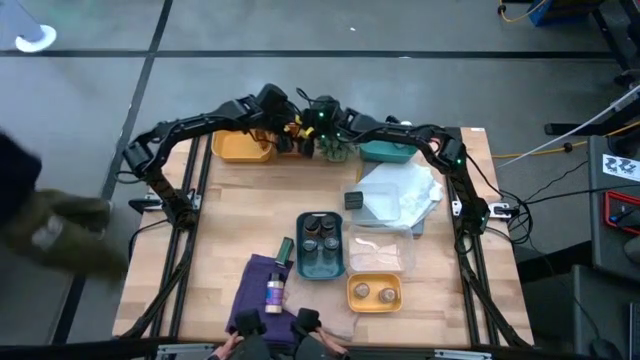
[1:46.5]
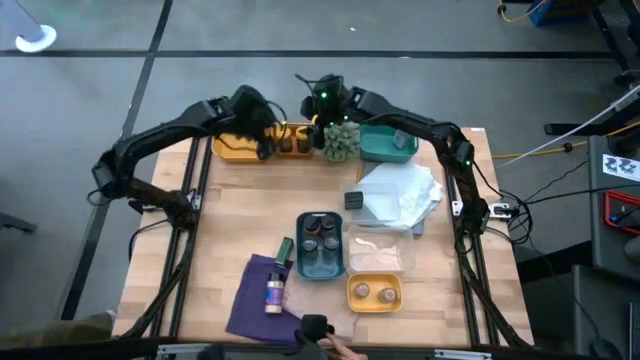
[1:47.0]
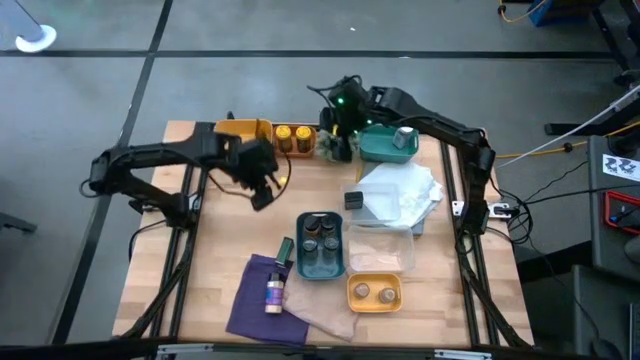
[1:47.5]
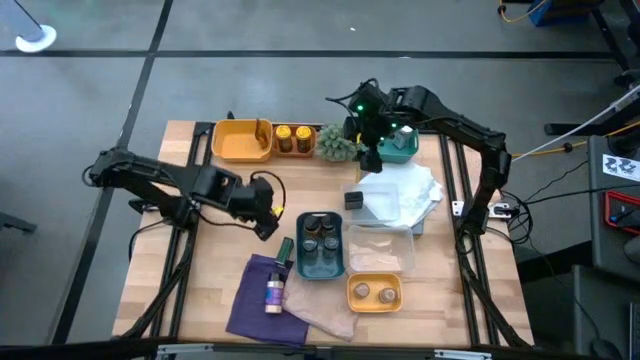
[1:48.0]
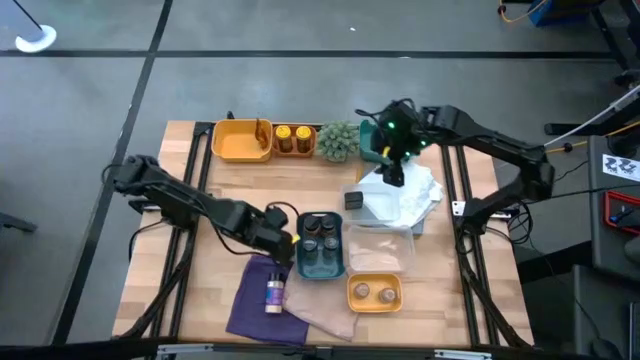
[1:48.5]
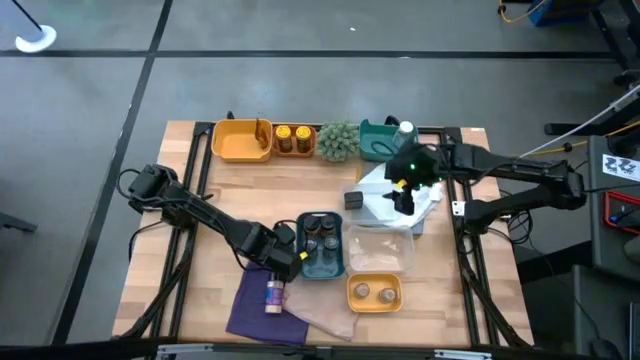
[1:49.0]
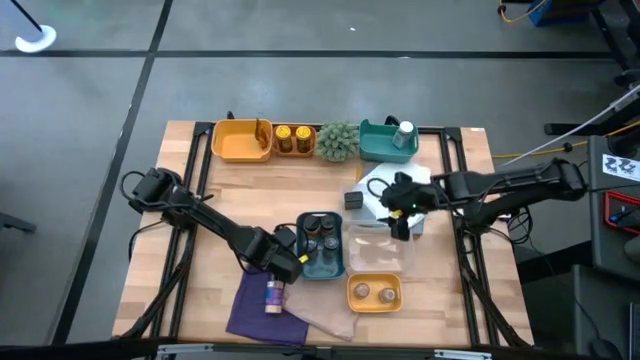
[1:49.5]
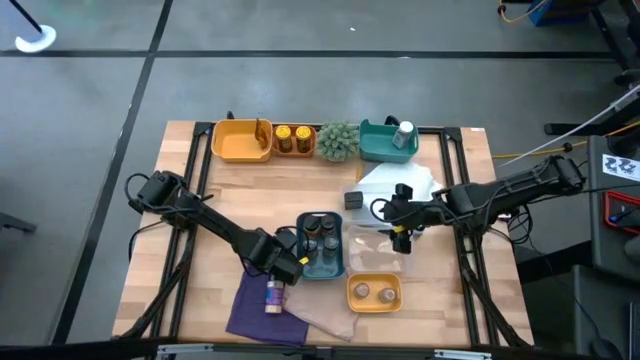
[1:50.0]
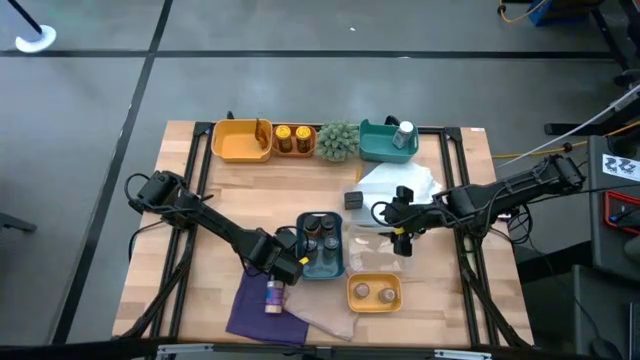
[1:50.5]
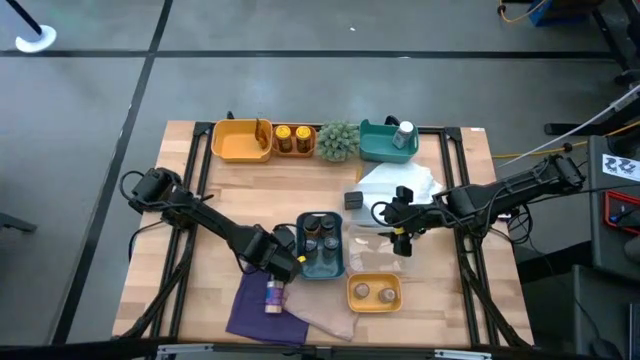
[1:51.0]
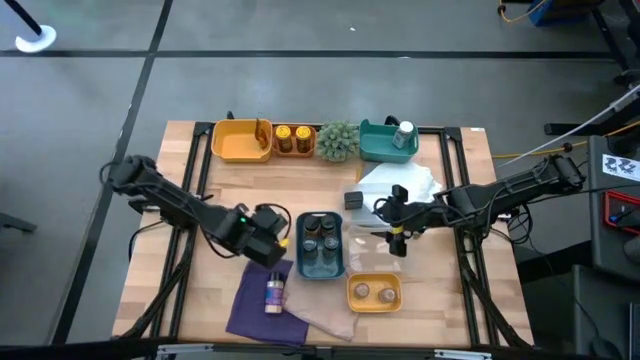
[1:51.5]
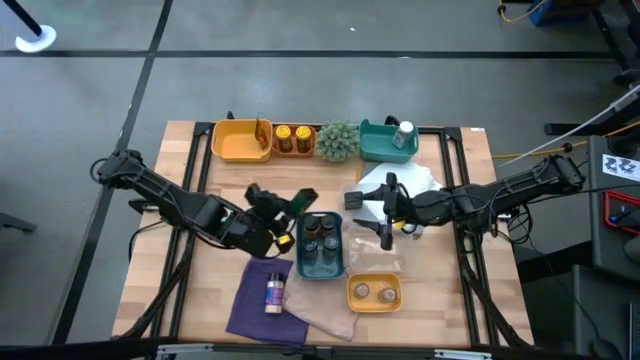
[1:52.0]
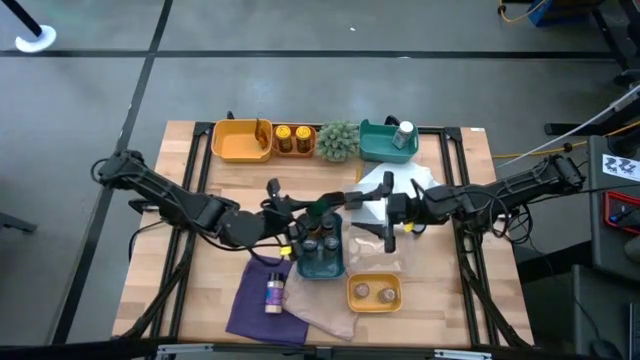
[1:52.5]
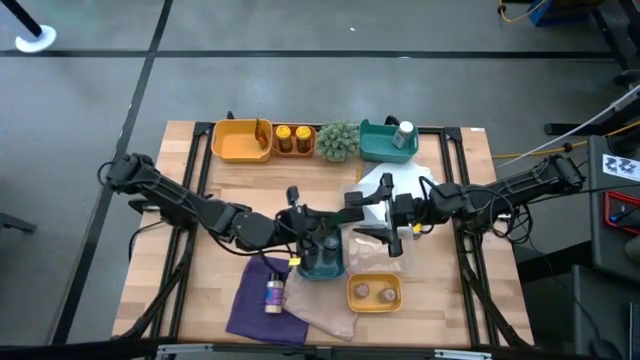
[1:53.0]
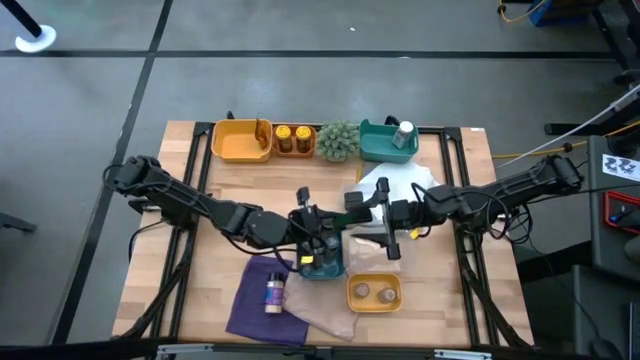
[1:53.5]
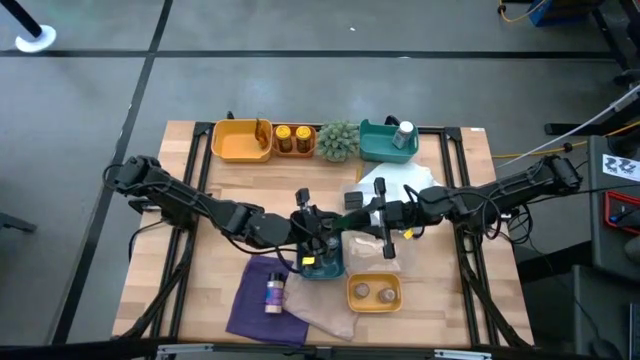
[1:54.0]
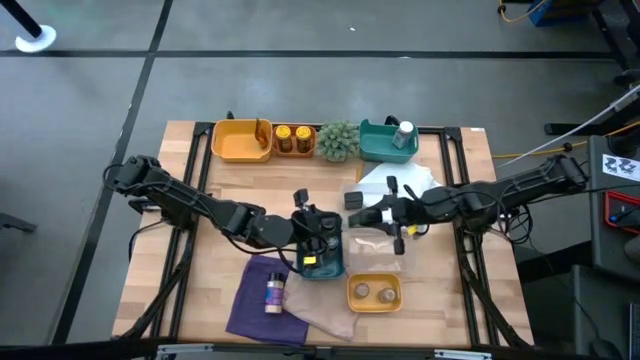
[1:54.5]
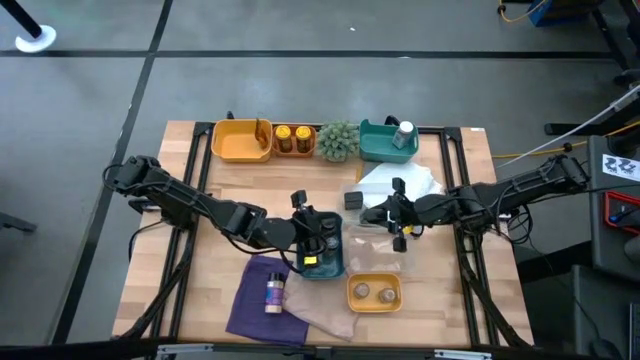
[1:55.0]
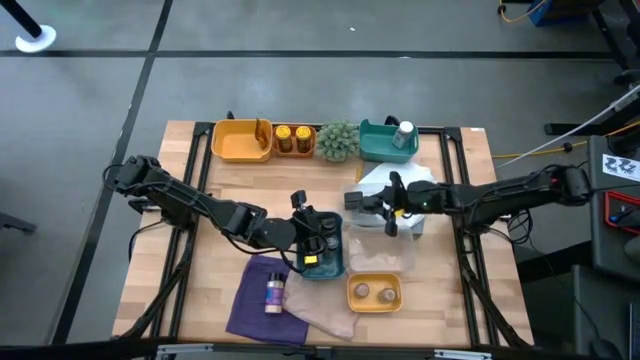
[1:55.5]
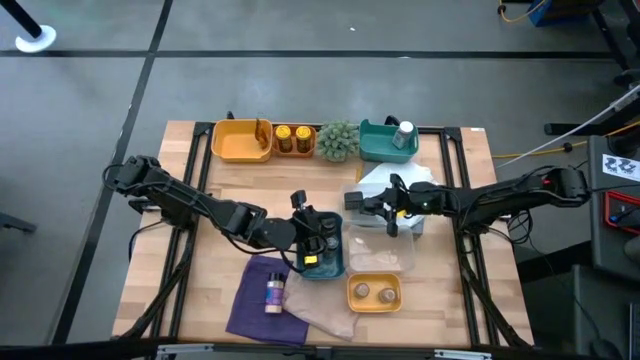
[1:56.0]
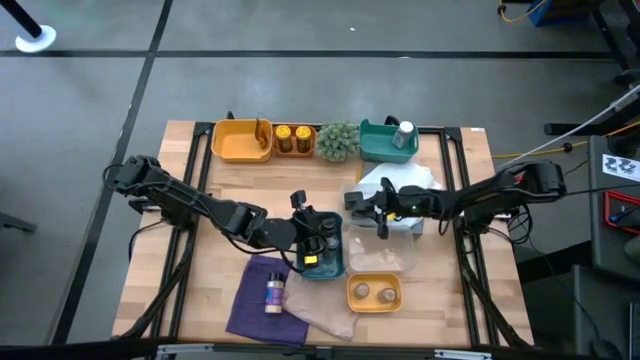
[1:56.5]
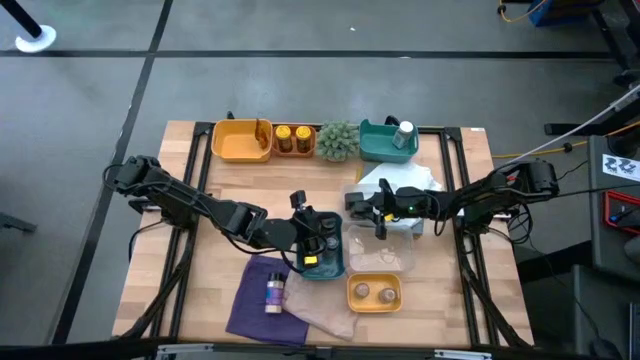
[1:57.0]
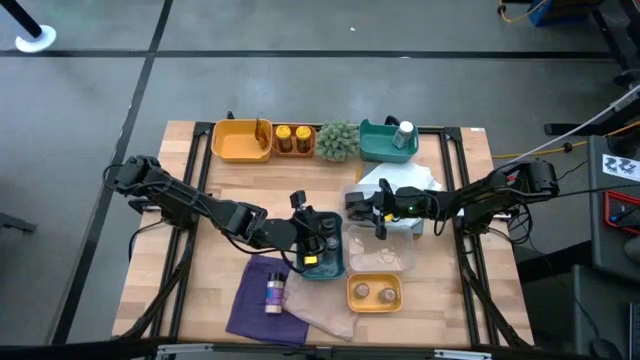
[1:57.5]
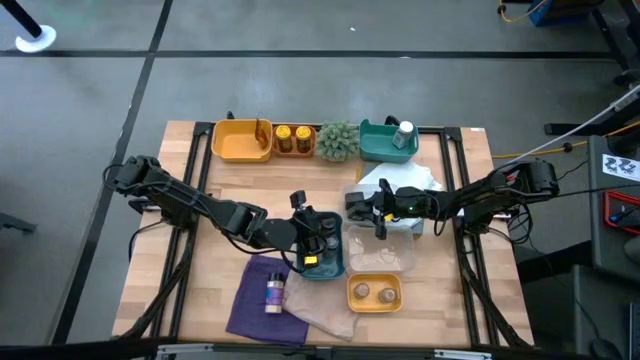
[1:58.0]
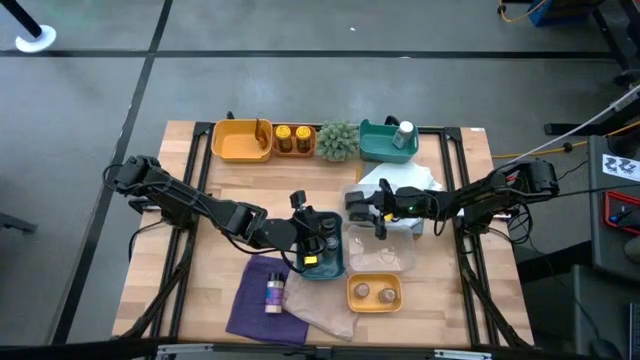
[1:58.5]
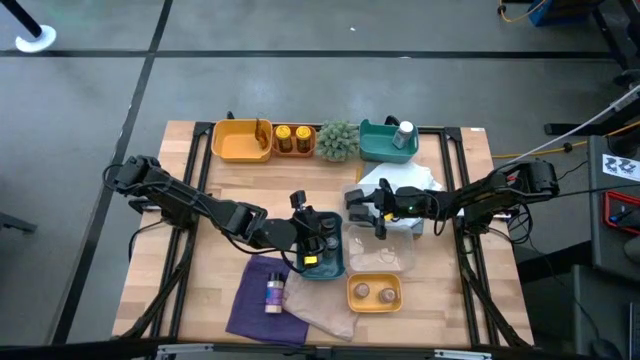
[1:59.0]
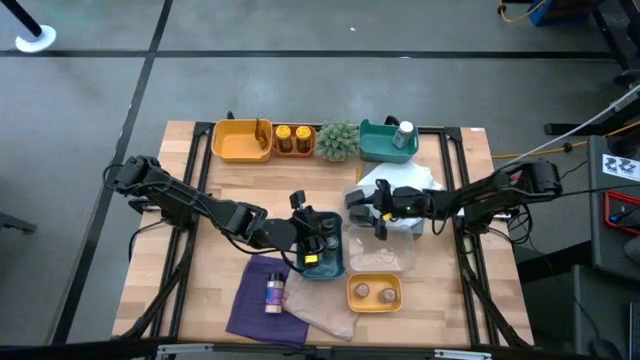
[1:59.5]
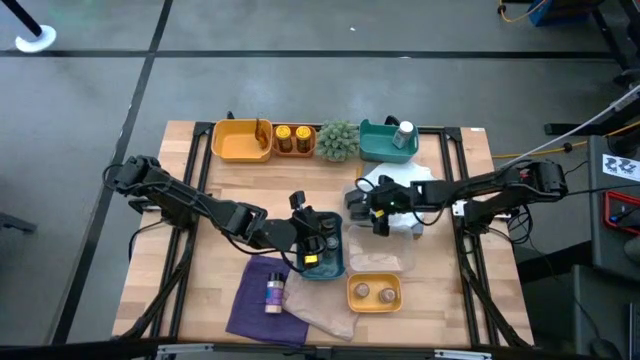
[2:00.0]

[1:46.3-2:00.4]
Task: Sort spices by type
Put the black seasoning can into the top transparent bin

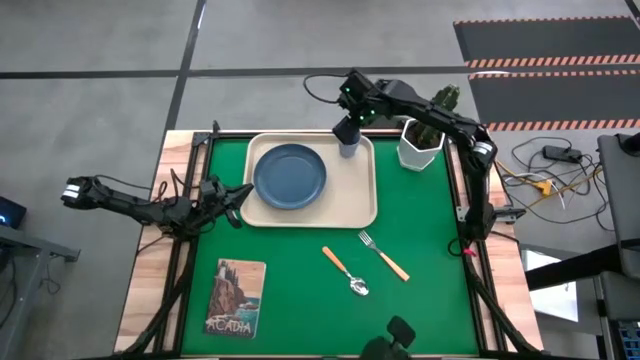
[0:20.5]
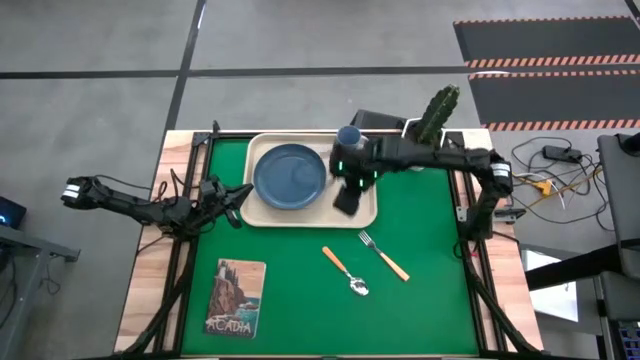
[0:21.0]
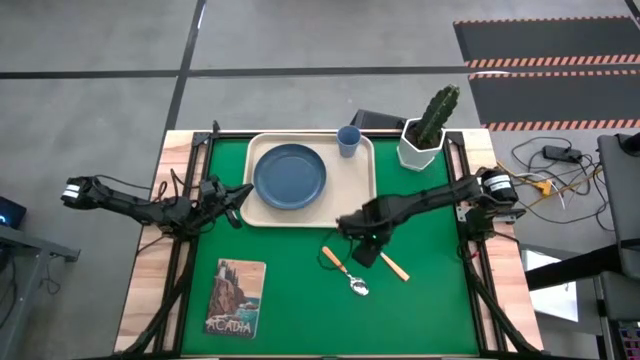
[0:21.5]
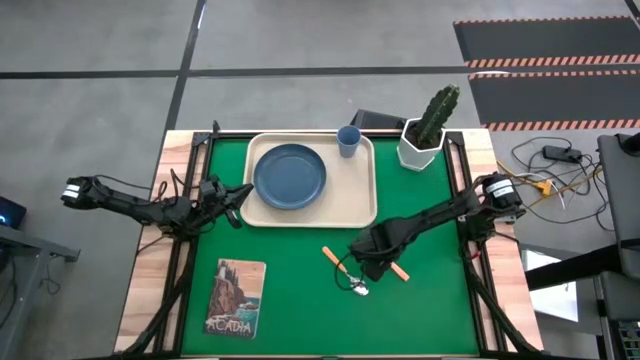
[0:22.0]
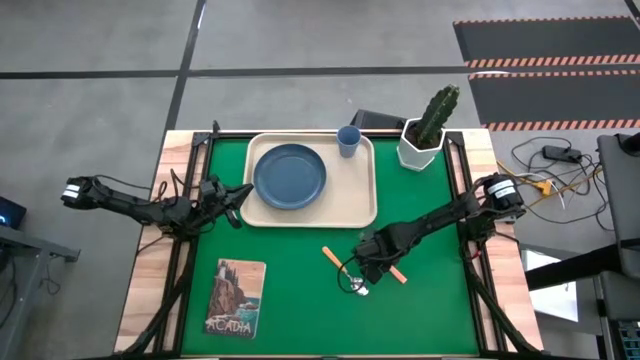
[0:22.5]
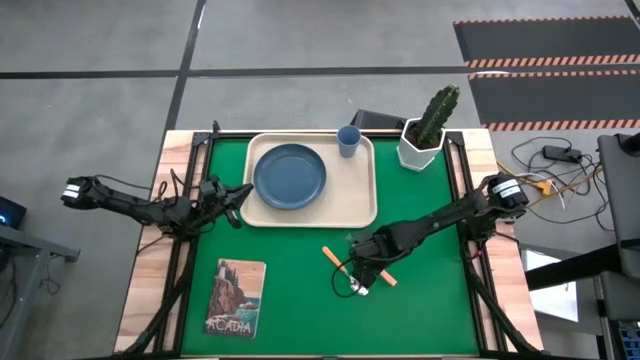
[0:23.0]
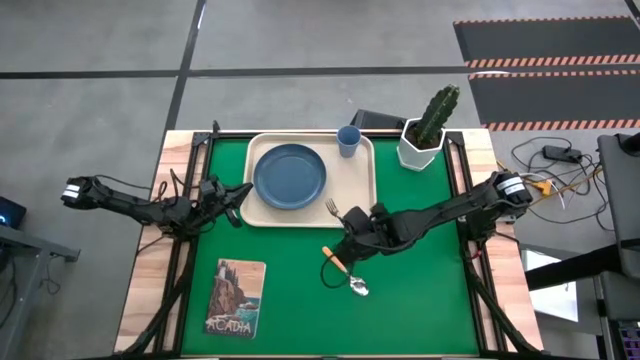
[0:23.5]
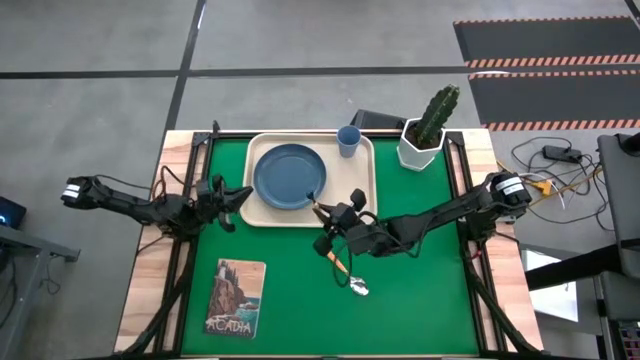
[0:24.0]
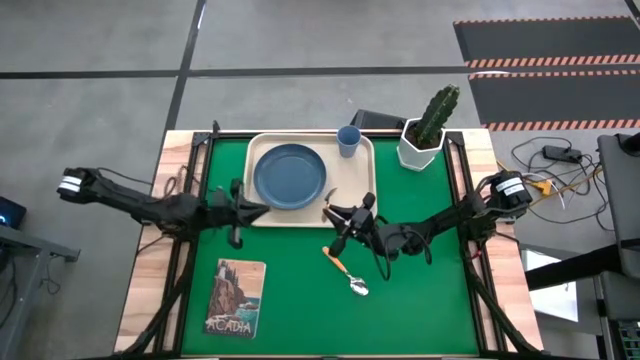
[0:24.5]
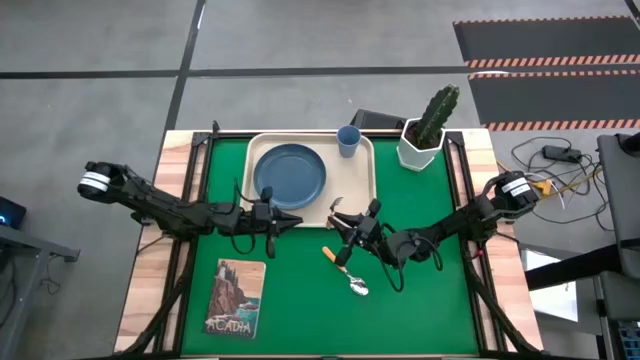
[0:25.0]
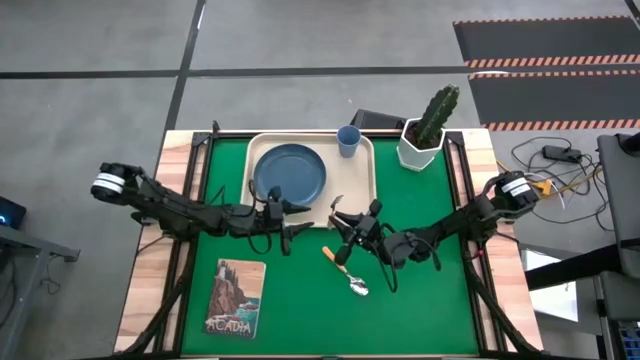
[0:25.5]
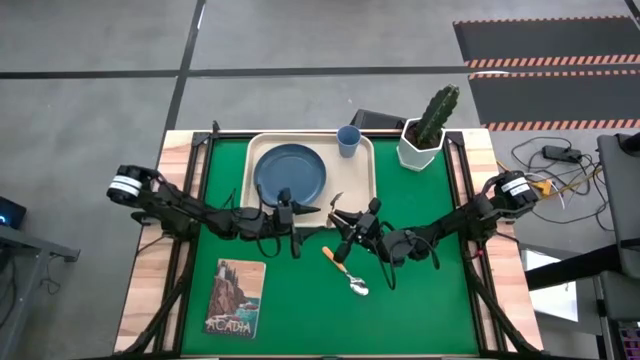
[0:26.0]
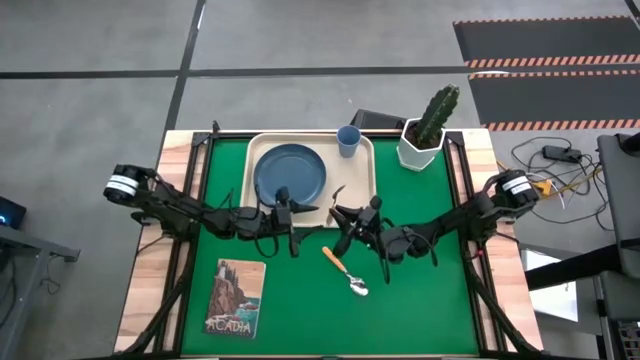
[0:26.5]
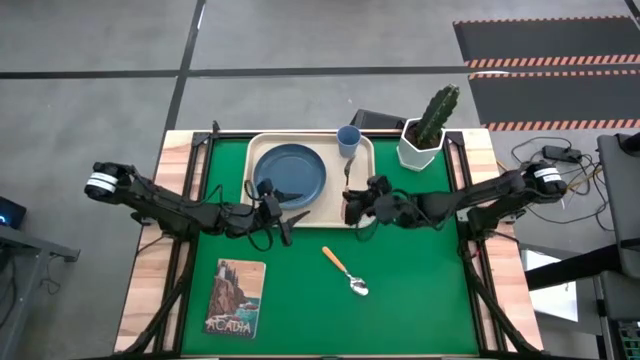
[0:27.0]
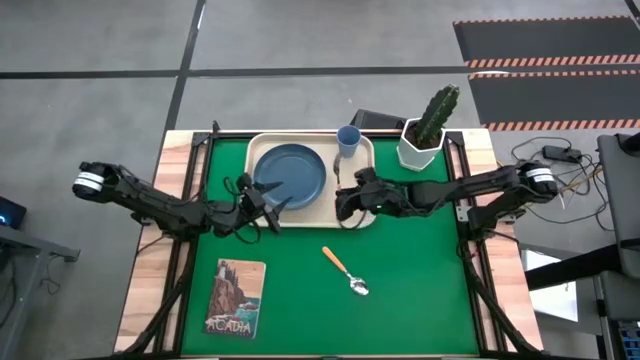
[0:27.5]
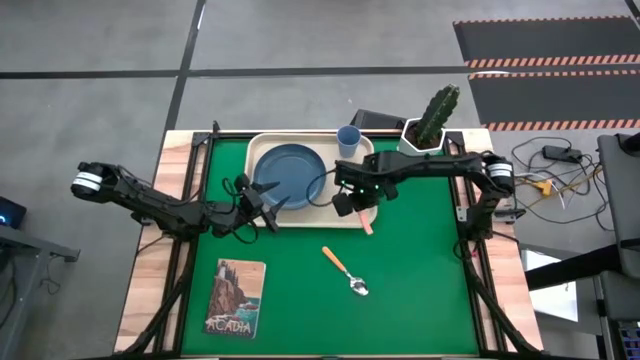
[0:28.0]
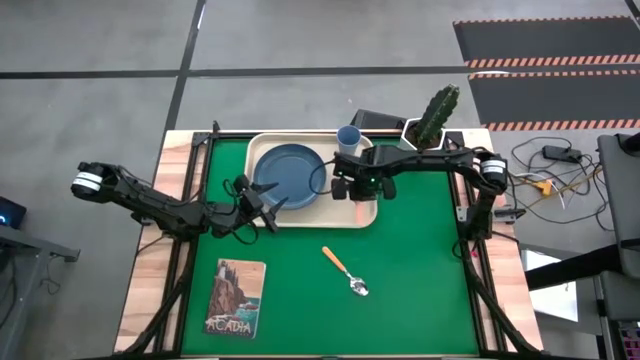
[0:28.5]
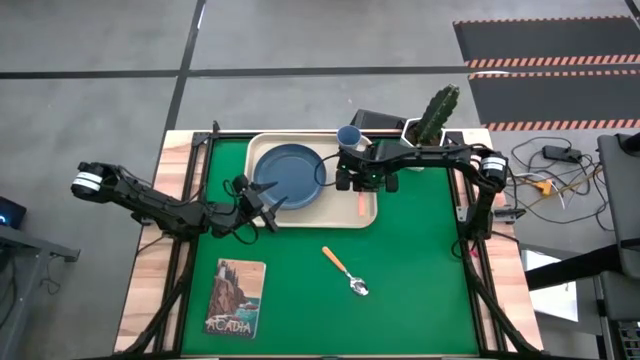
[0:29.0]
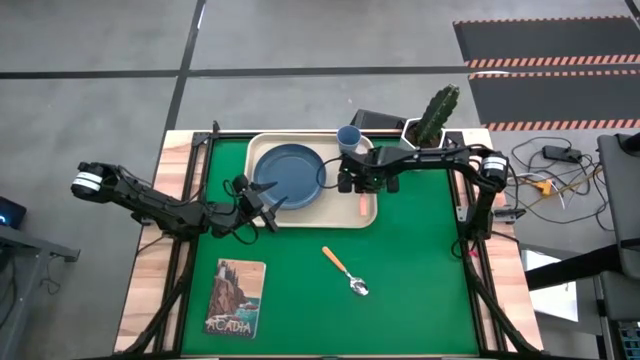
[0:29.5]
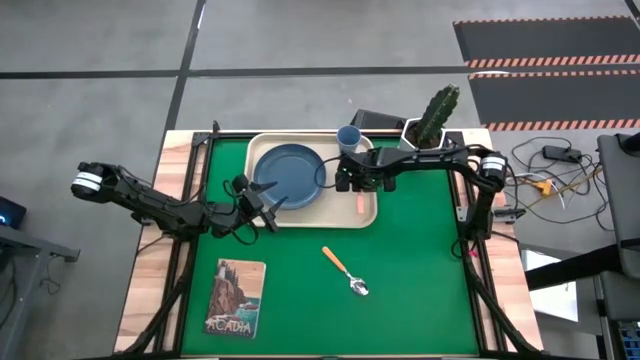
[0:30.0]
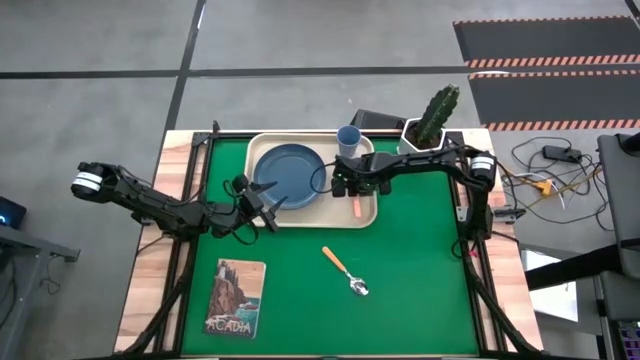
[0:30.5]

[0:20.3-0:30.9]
Task: Pick and place plate/cup/fork/spoon on tray
Put the yellow fork on the white tray
